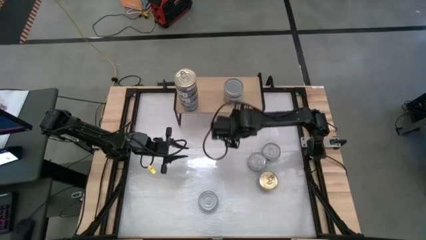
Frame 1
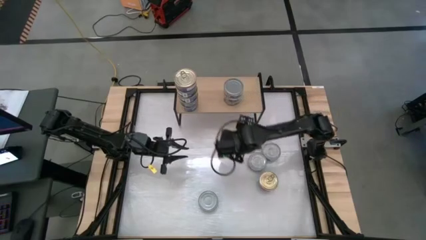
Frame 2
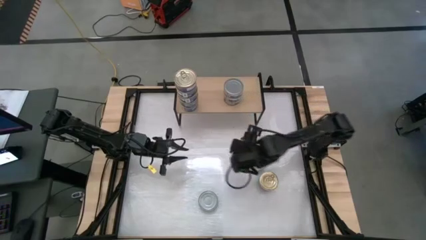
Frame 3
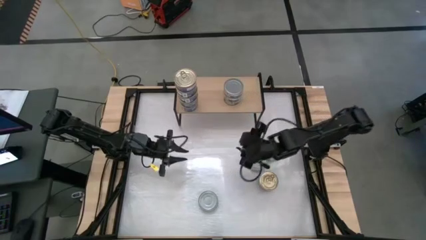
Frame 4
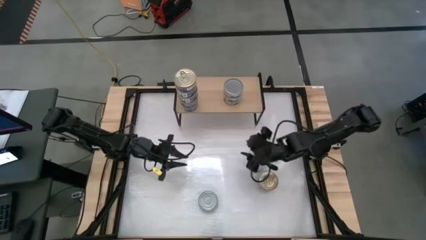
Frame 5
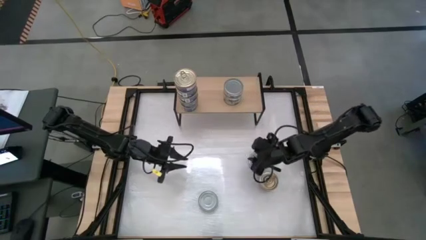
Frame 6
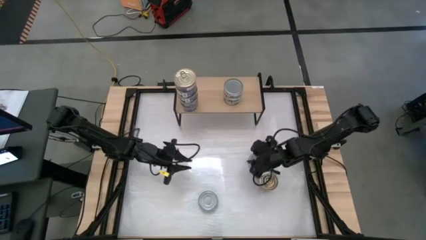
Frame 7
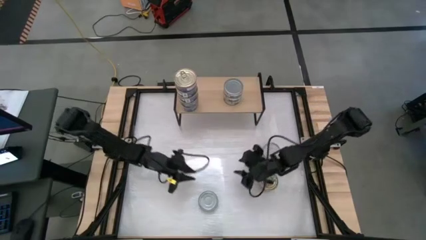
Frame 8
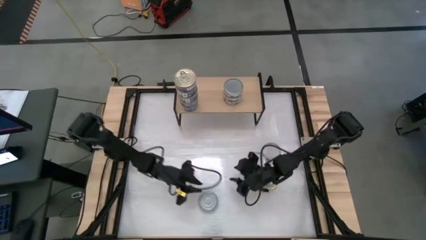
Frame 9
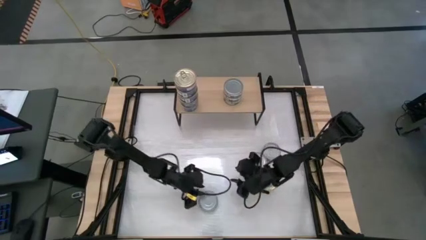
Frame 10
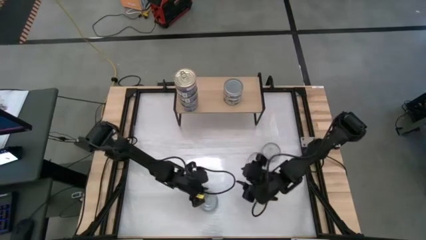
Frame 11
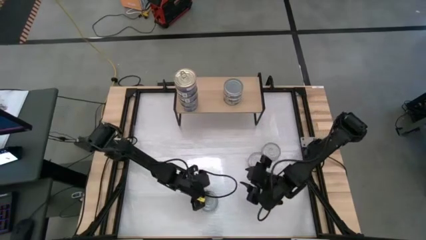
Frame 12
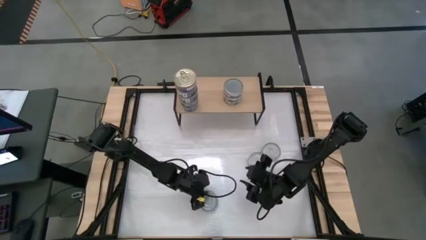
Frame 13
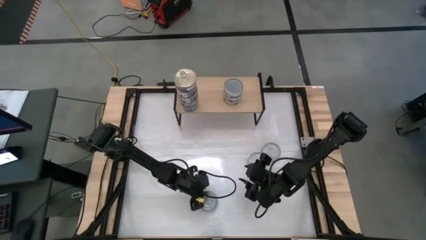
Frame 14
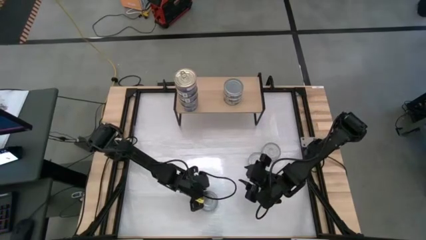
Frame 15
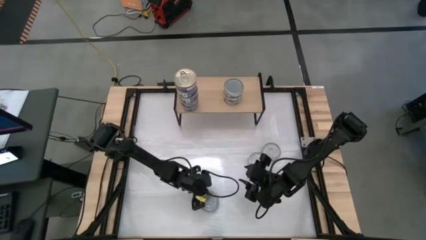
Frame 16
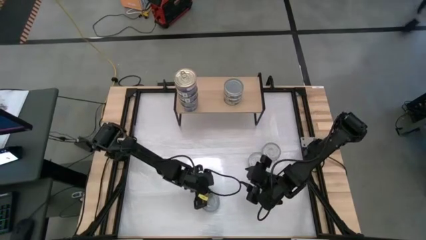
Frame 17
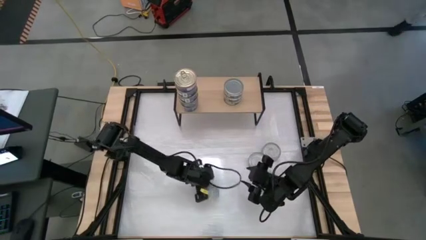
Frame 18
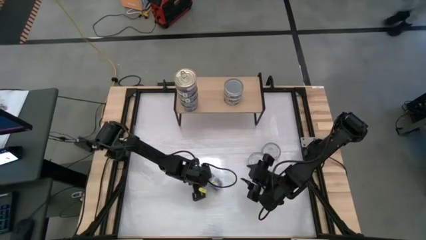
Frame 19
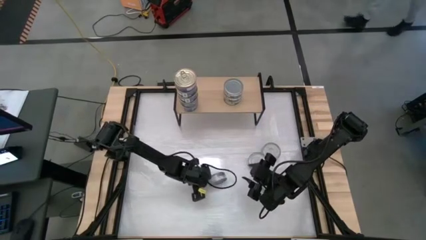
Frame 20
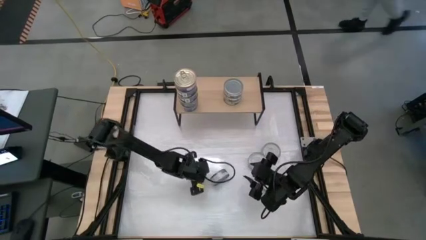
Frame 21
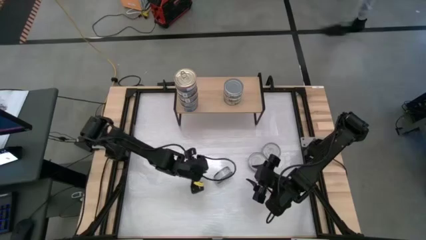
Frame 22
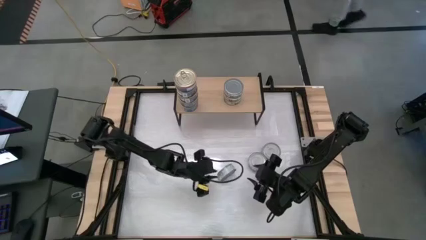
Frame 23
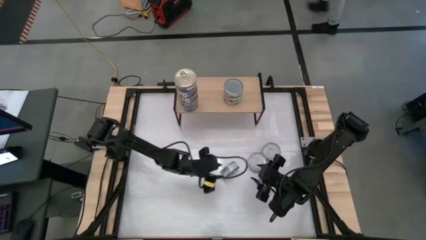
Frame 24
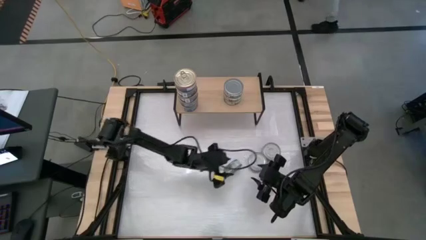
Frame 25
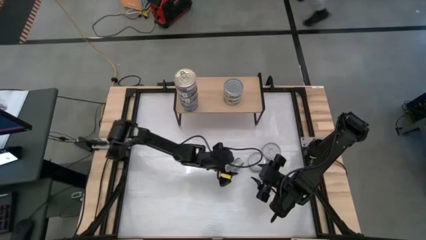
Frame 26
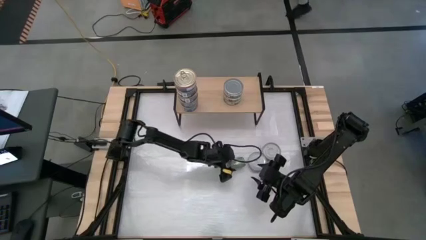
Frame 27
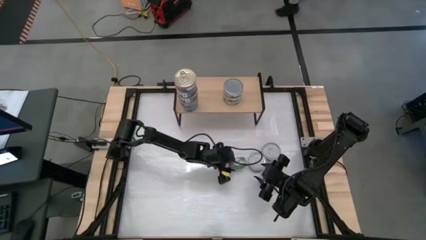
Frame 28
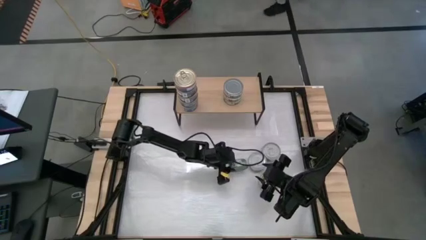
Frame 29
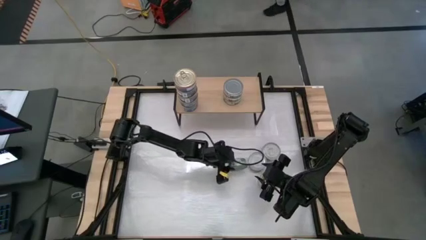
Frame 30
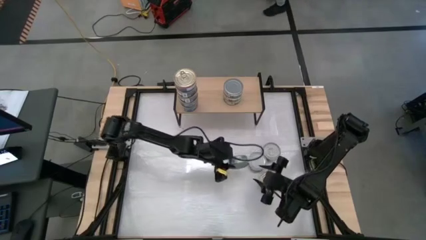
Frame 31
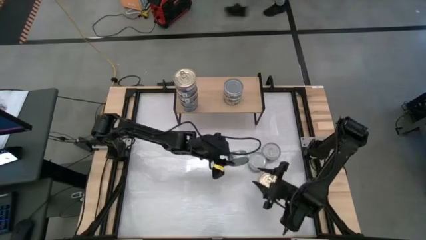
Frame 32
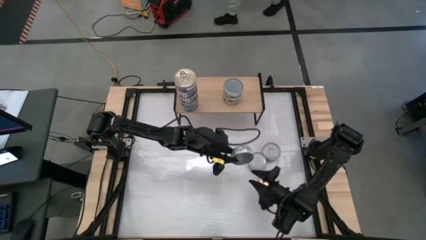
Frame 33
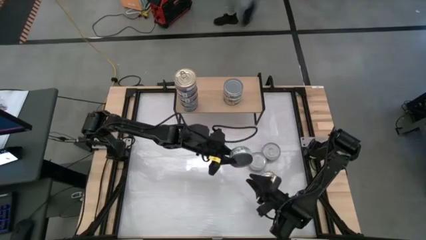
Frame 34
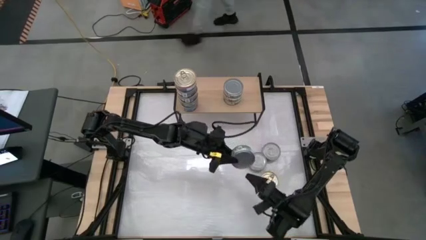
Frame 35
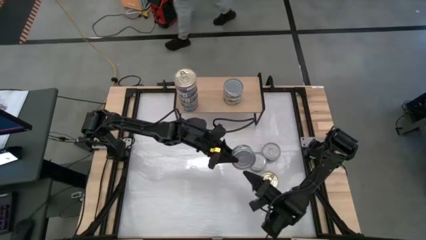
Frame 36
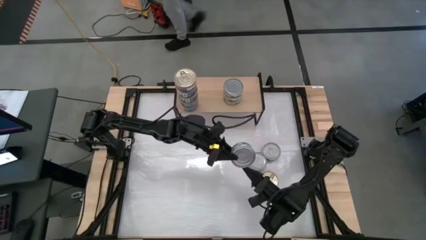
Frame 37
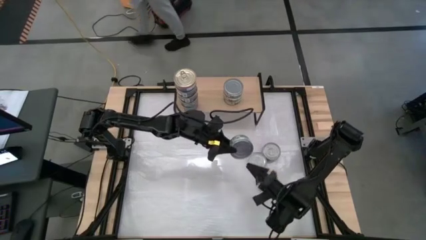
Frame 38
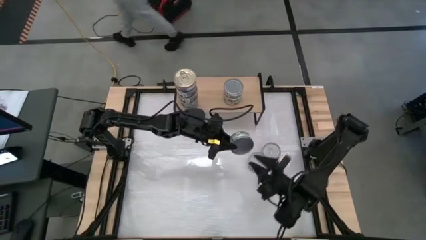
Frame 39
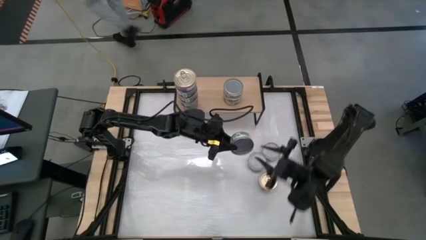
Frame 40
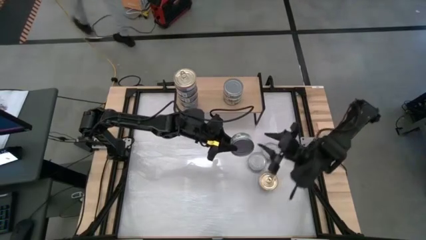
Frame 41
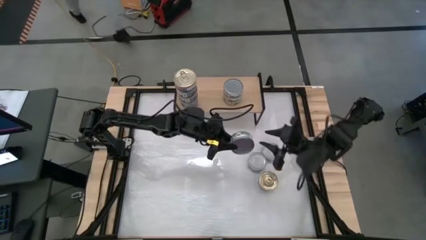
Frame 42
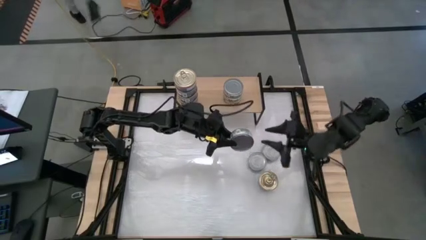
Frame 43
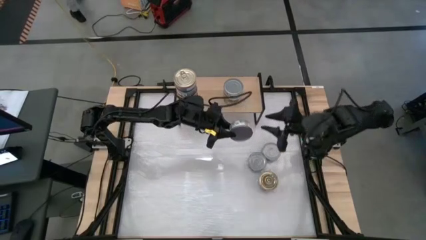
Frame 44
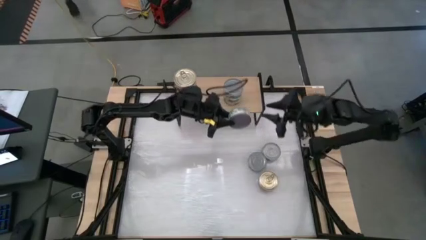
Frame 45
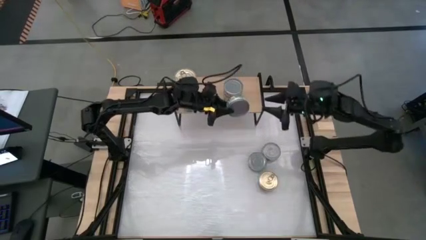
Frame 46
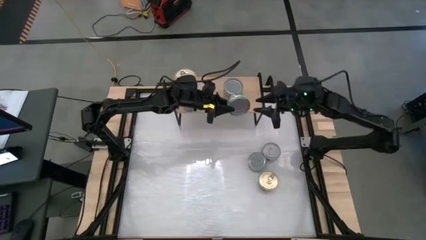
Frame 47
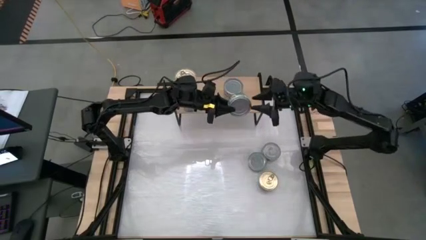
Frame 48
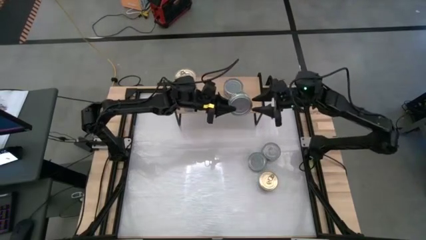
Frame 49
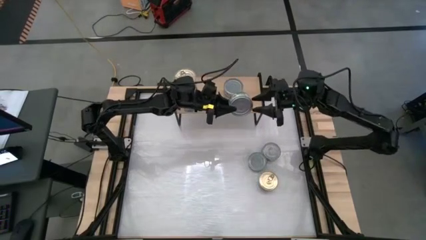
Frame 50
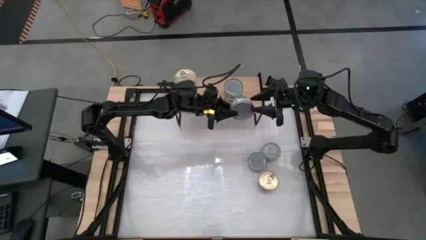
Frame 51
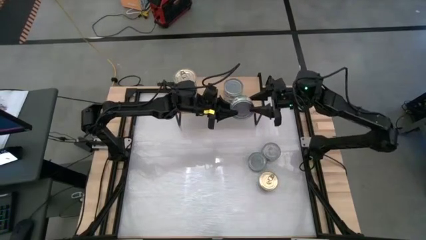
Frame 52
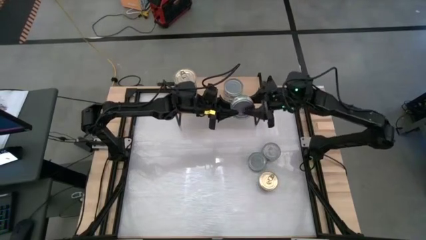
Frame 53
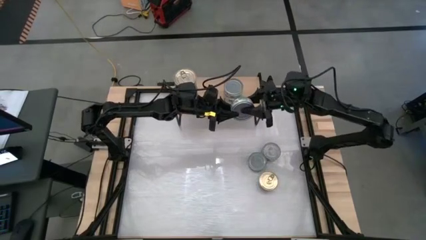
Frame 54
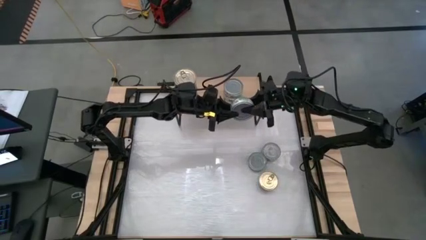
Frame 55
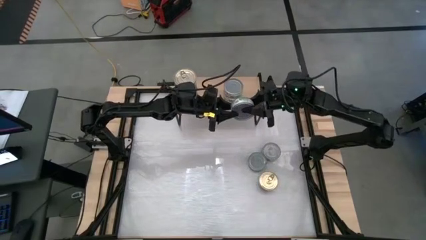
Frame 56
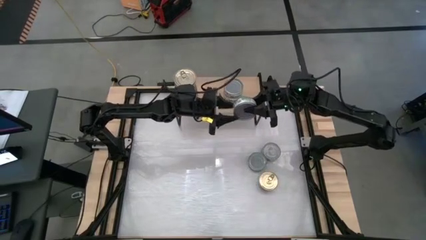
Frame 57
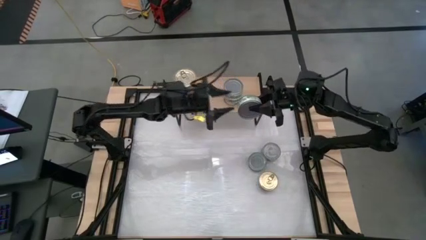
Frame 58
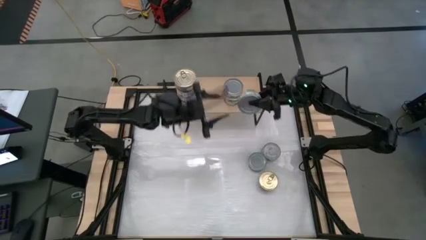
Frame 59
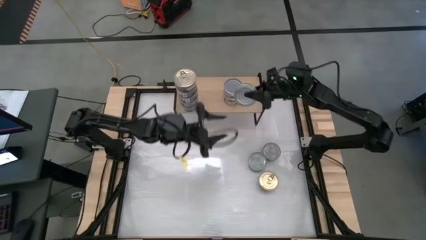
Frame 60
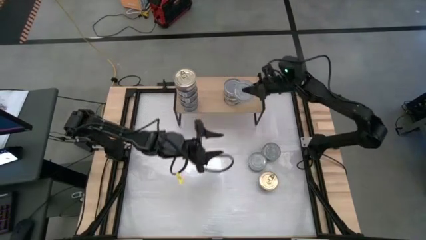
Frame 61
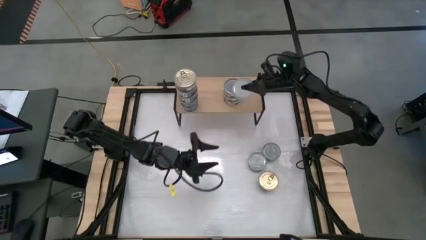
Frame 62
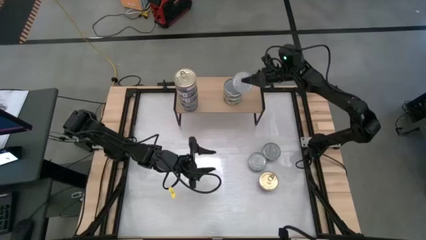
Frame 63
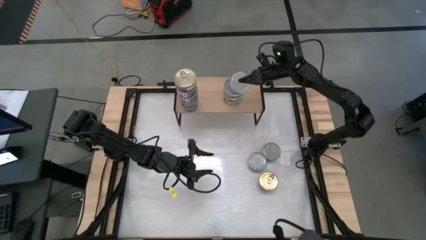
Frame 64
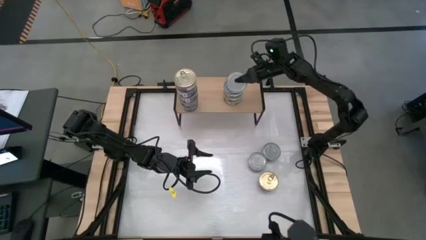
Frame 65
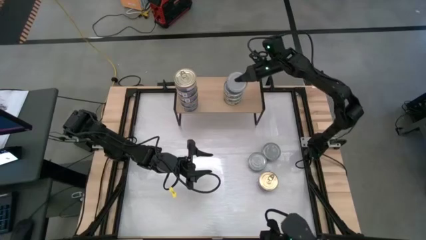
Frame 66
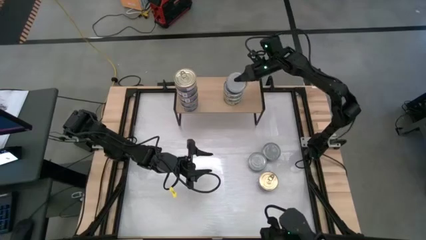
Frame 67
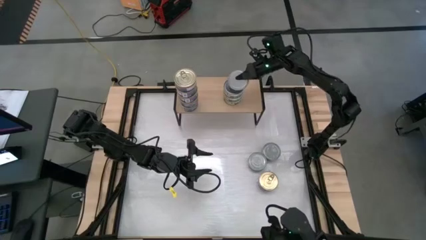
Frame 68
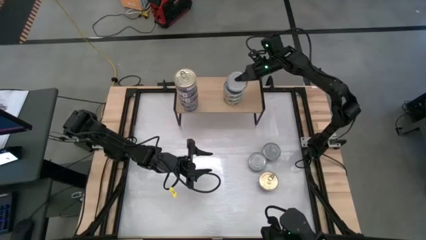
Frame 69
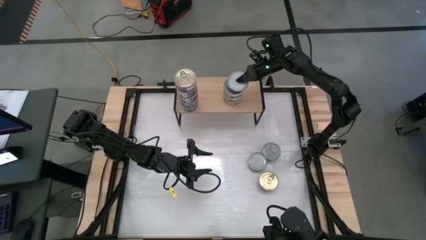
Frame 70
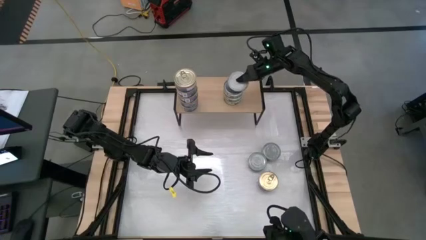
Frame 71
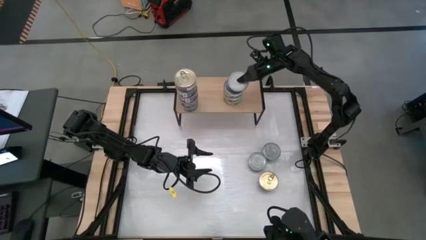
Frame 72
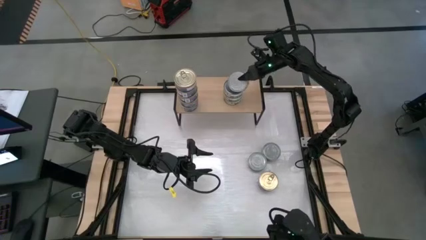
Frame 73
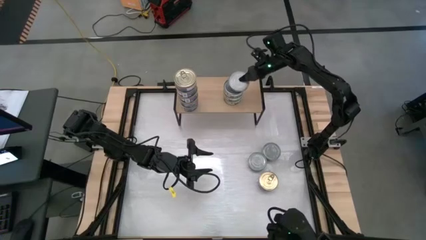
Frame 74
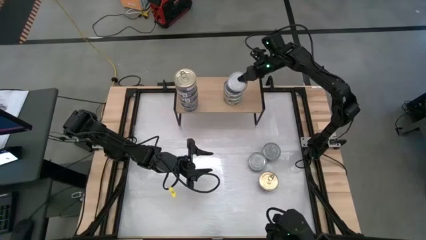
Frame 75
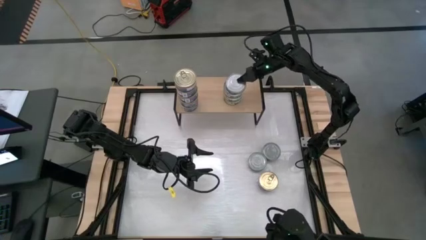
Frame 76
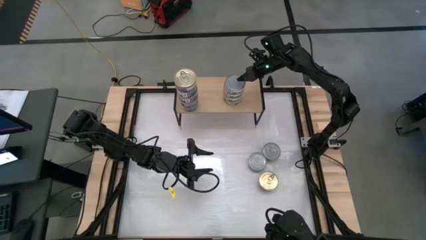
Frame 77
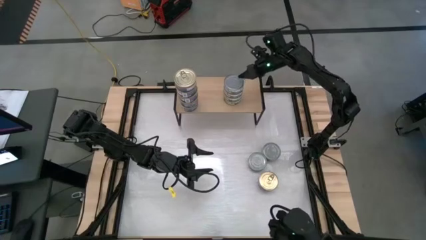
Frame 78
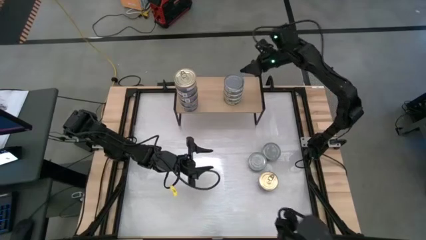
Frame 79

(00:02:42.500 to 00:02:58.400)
Task: Stack canned seafood by type on shelf
Stack the green tuna can on top of the other green tuna cans on the shelf
